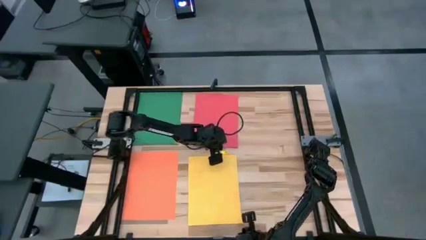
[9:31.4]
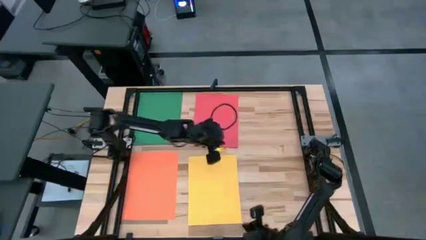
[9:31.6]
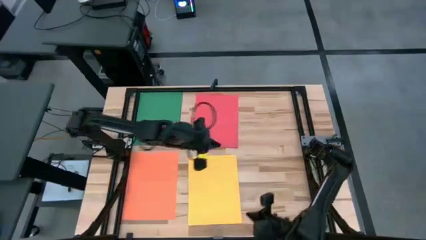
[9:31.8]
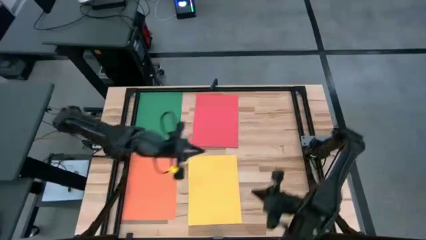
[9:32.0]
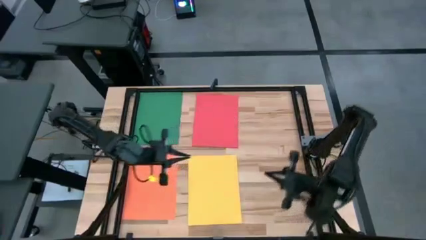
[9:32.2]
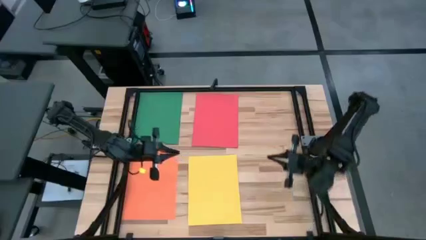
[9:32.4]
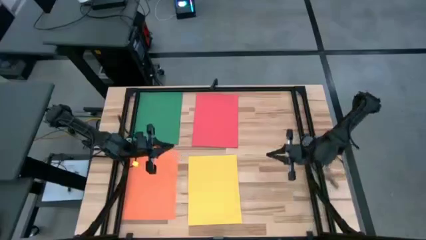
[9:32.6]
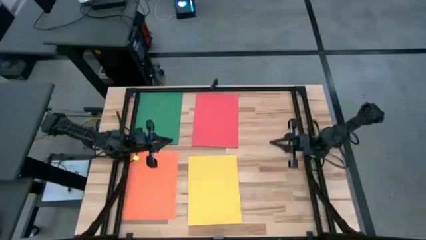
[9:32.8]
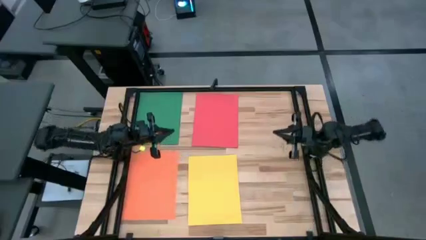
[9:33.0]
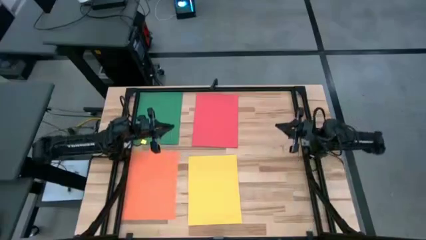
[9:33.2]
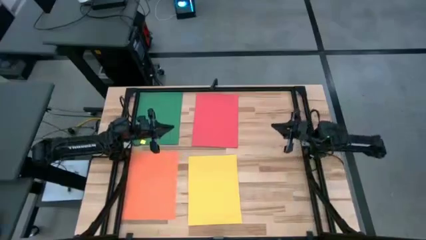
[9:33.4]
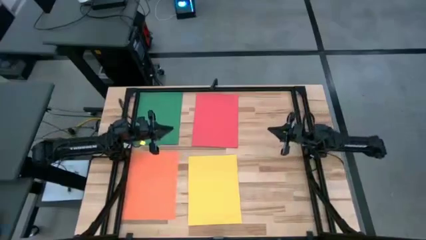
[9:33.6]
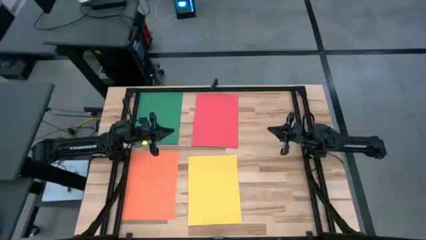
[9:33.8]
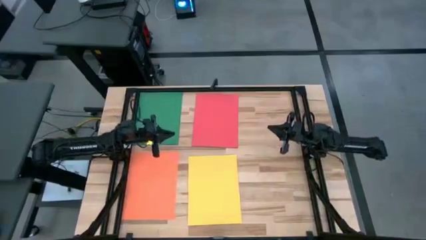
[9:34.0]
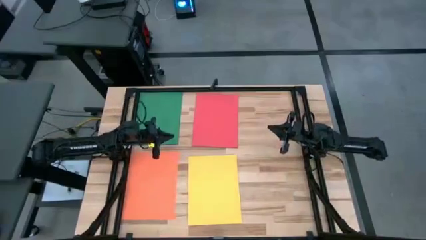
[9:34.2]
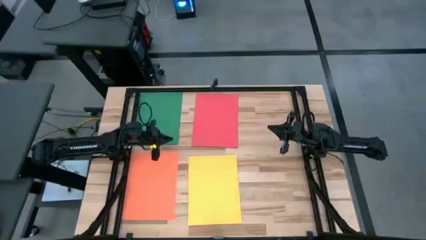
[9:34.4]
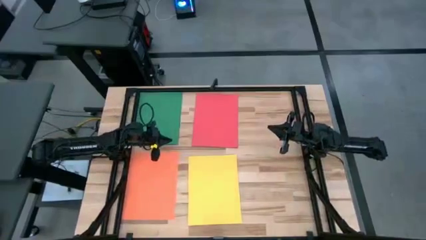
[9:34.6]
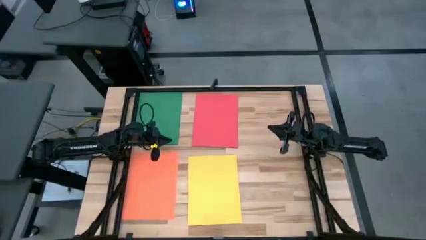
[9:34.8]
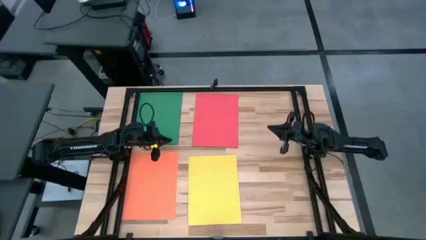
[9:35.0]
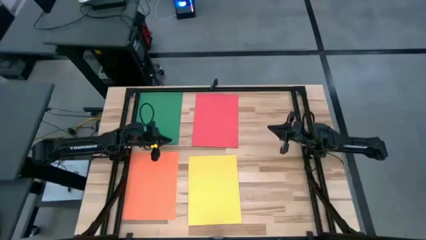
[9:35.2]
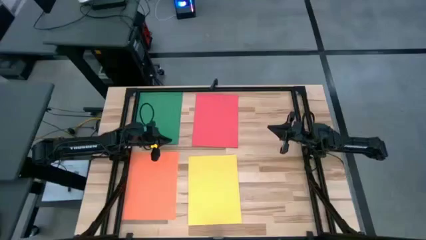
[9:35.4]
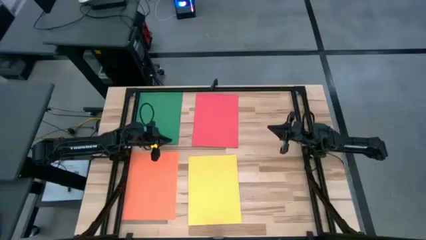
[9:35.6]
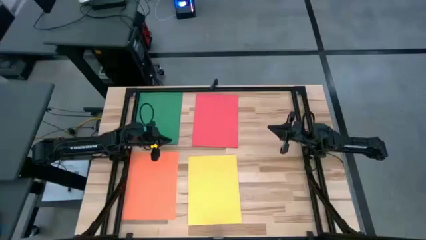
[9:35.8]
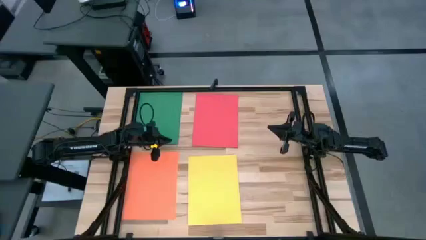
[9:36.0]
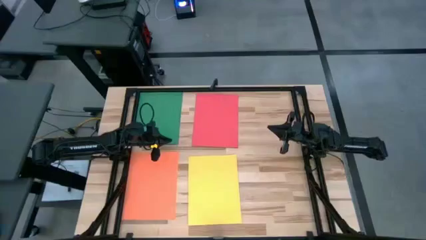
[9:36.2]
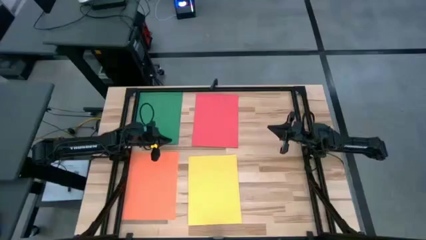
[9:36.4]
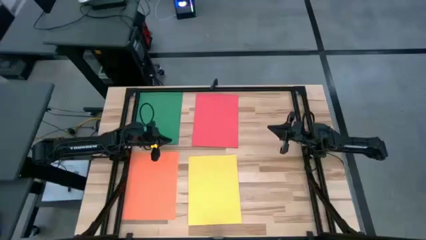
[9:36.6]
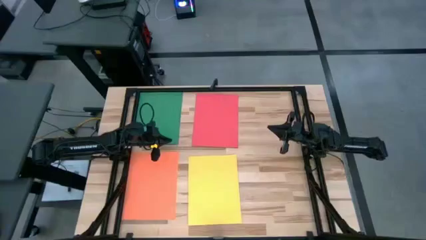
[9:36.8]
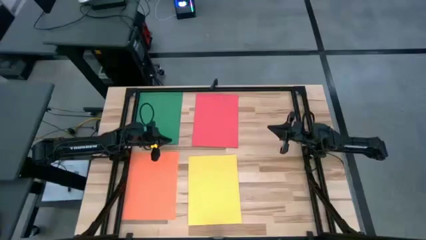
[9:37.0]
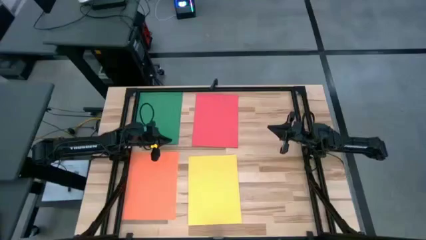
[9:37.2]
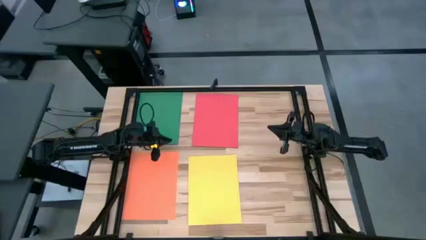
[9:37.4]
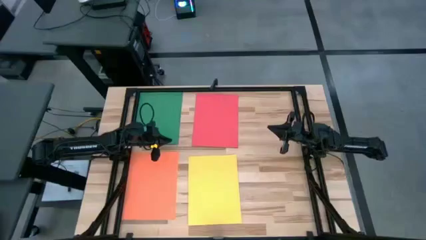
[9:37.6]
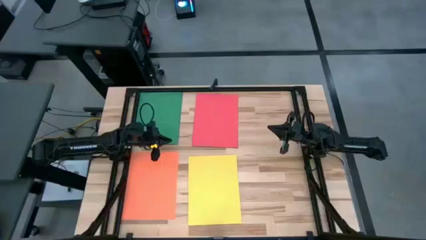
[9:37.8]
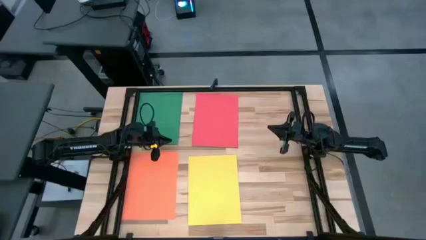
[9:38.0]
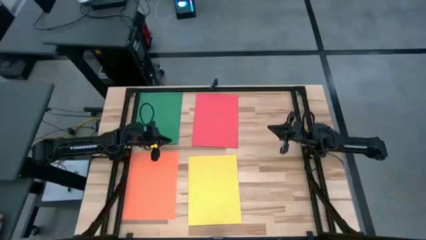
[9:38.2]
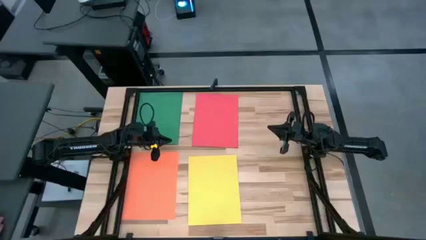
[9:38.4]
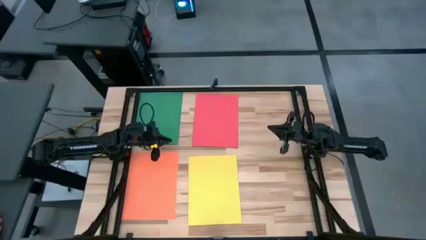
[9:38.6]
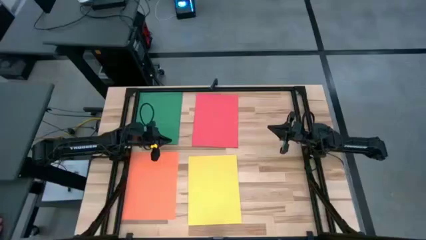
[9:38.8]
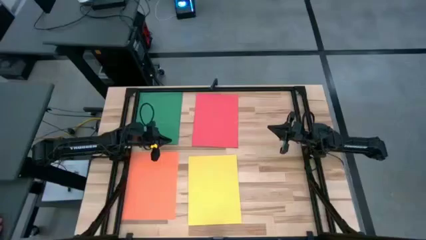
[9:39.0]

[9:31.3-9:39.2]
Task: Organize paper
Return to Home Position

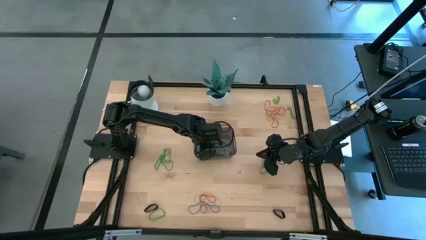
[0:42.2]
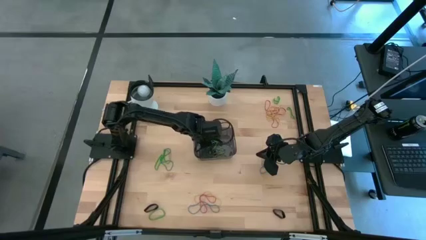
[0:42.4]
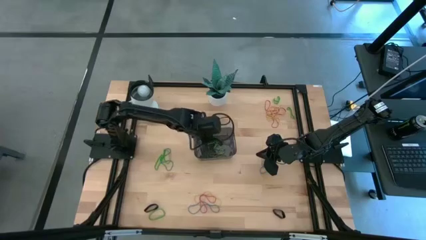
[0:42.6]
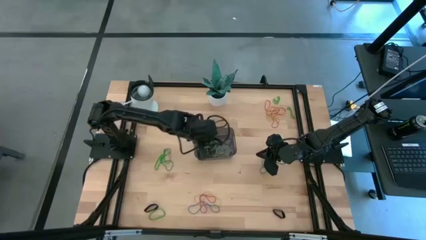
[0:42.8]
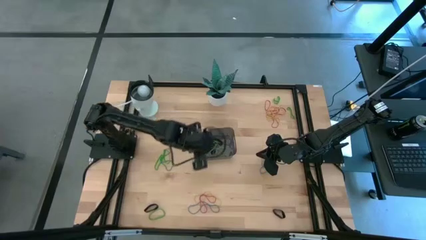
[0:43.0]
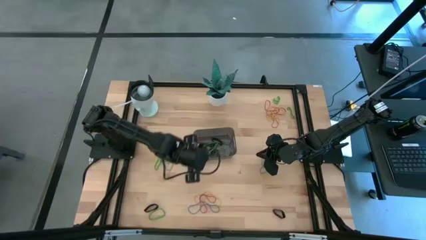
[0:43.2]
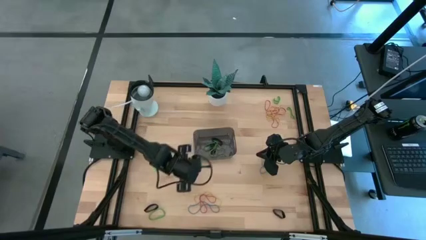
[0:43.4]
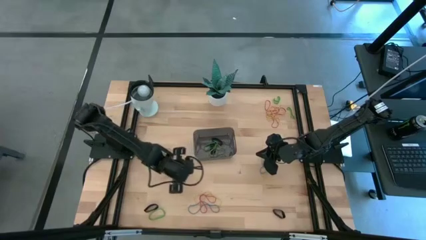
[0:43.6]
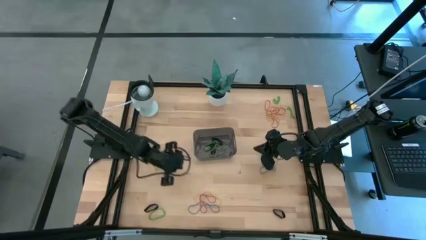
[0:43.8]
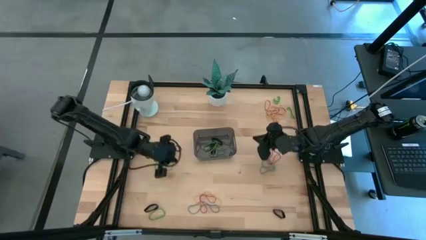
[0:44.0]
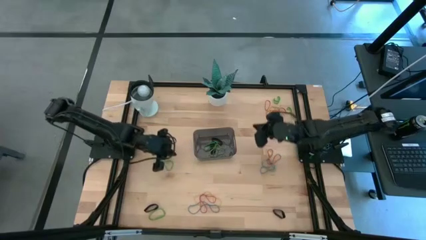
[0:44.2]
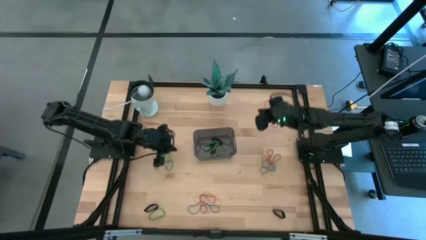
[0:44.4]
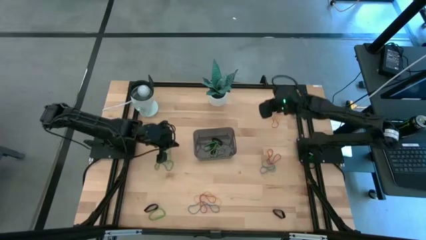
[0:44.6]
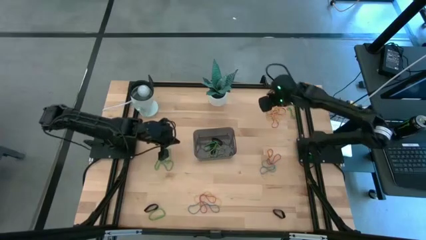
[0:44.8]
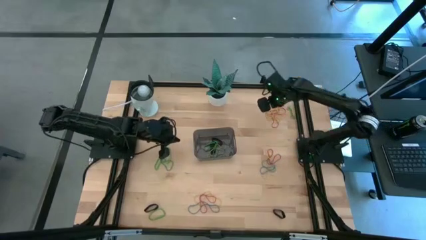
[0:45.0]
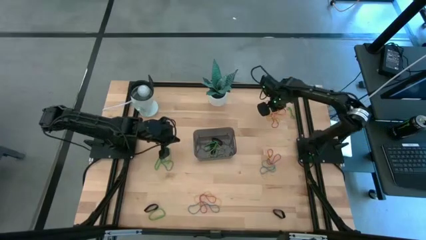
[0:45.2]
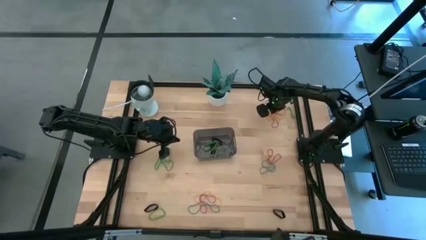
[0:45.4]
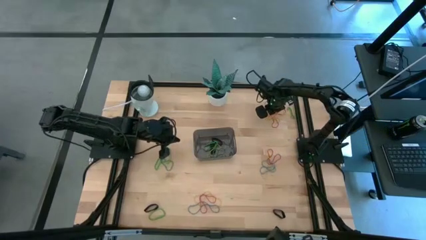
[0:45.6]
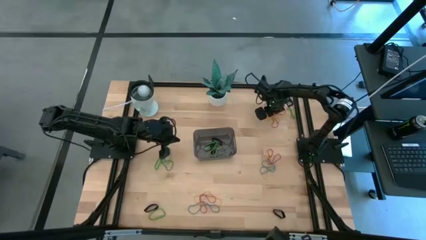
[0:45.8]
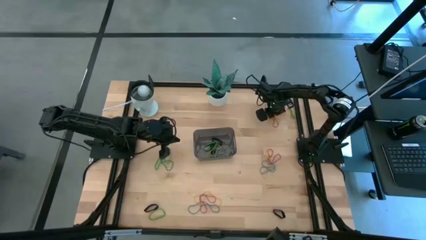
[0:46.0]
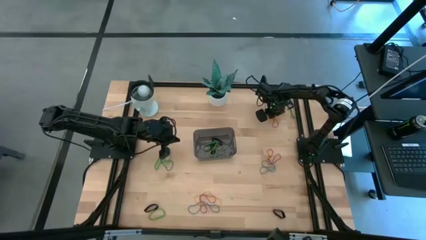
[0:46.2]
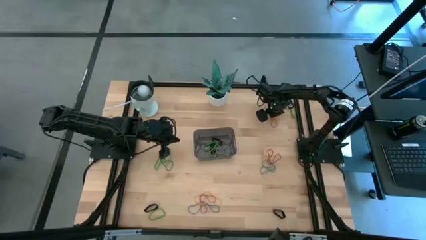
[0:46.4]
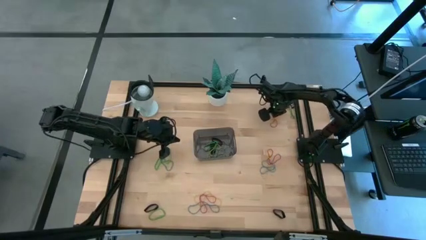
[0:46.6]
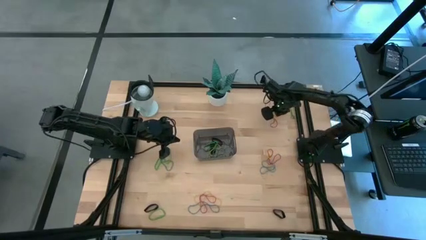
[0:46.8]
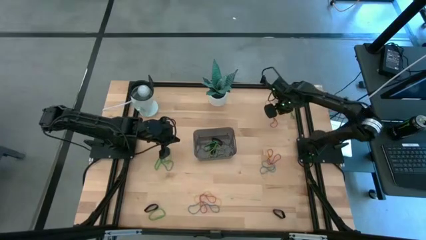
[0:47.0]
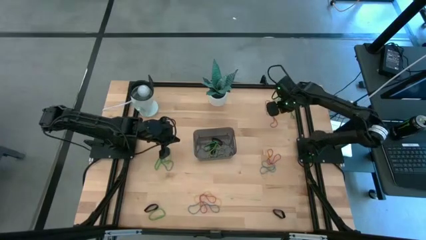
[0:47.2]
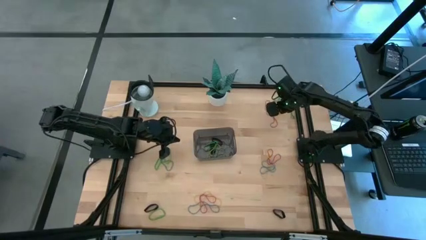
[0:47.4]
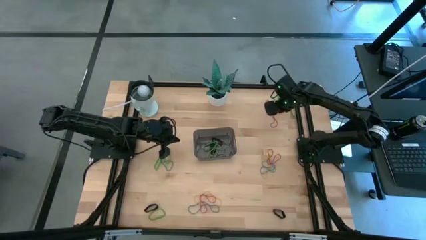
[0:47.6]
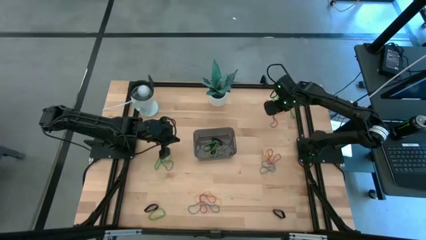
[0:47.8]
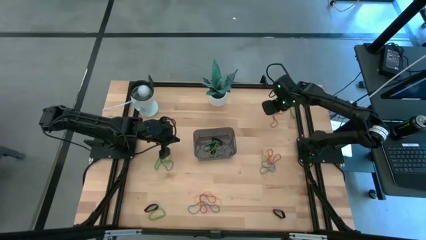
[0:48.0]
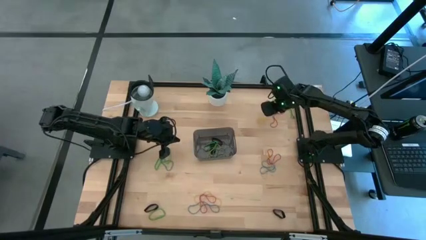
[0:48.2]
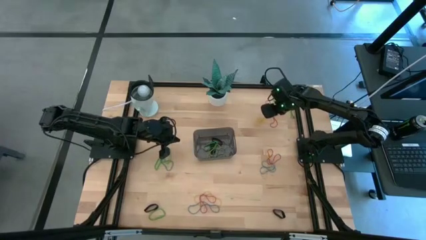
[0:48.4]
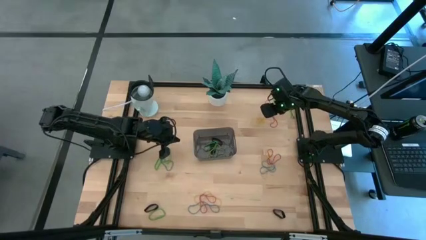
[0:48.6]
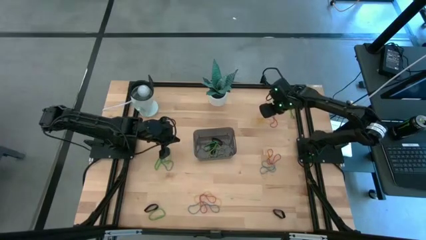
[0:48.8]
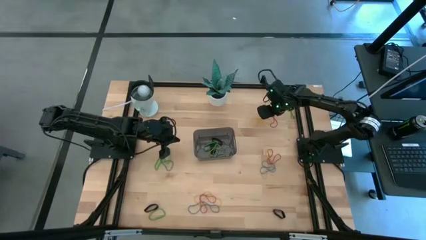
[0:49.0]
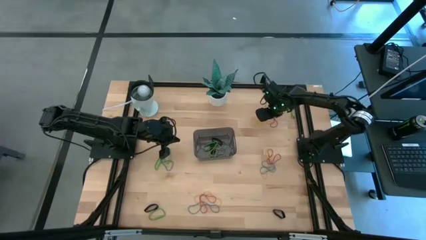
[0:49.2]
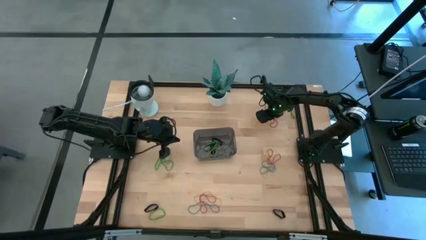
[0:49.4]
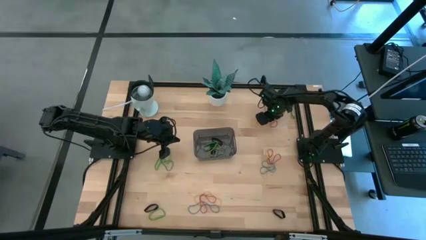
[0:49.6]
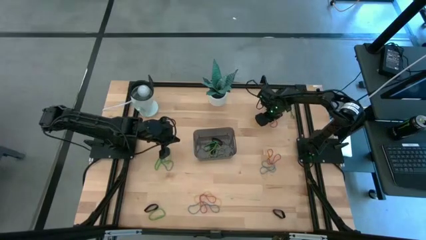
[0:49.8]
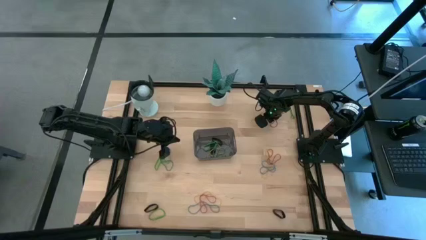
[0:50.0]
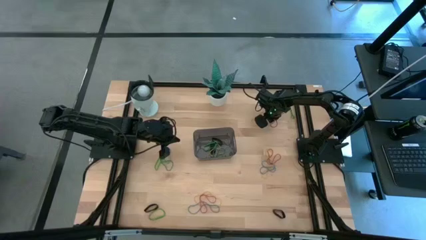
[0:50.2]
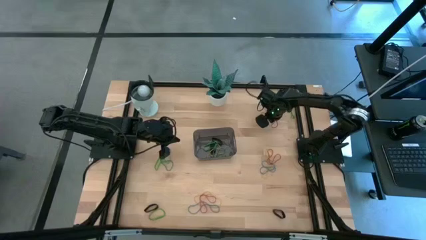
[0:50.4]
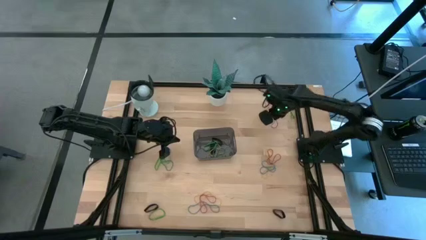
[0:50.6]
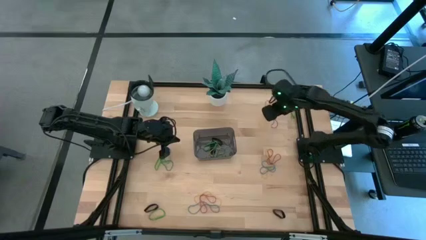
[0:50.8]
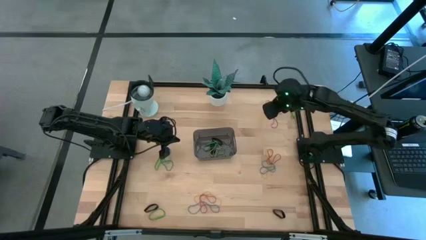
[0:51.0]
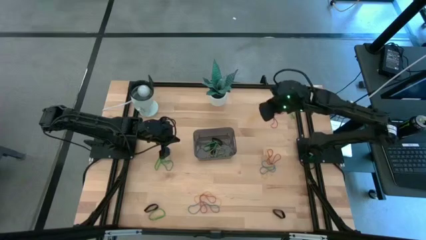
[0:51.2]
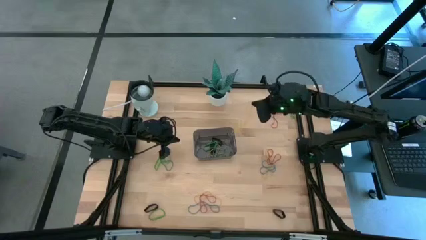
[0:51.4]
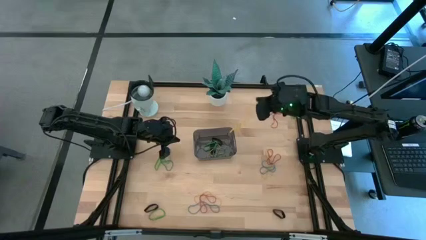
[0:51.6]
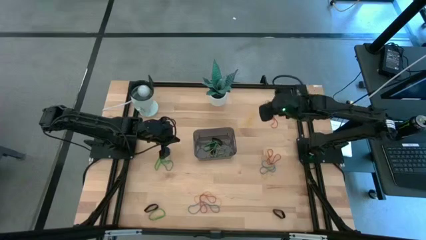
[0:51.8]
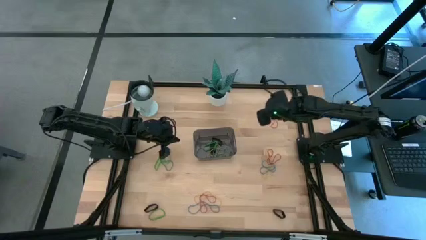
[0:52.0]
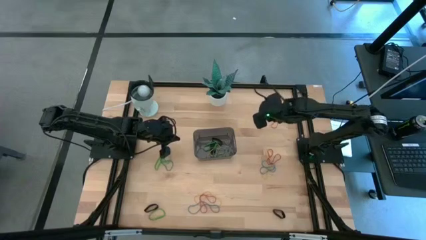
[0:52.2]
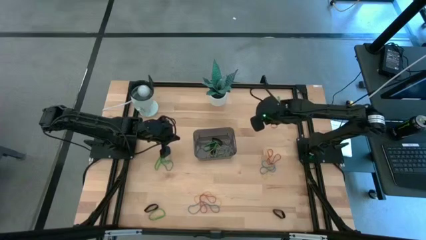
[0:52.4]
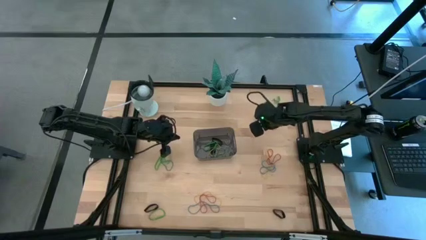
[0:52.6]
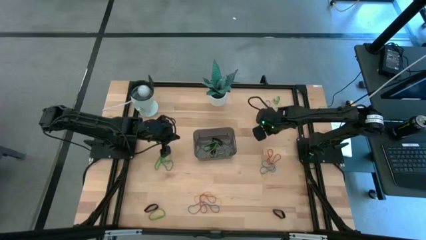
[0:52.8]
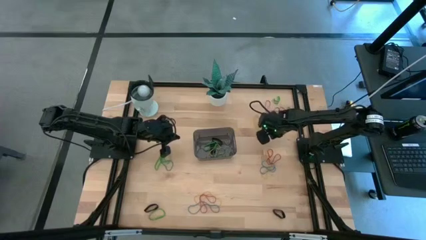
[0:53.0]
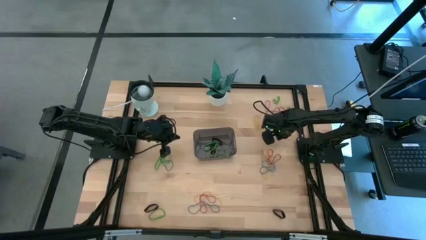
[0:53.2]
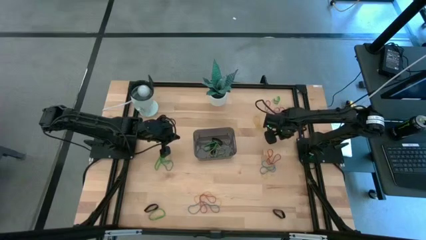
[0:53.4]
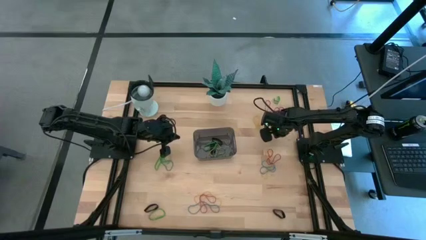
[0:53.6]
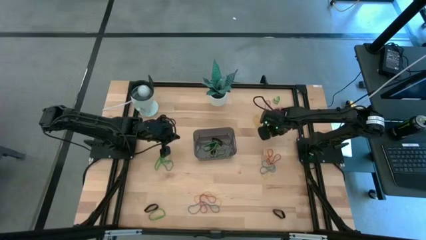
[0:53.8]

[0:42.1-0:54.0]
Task: Pick and place rubber bands into bin
Put the yellow rubber band into the black bin
